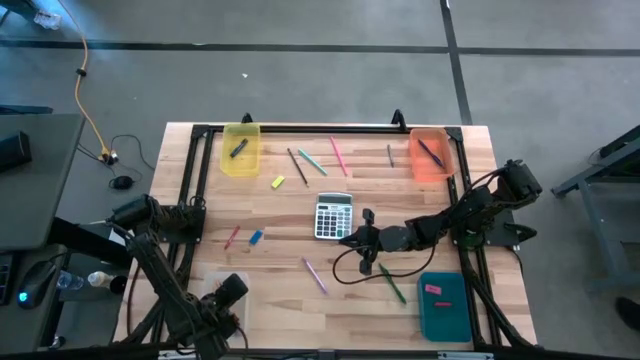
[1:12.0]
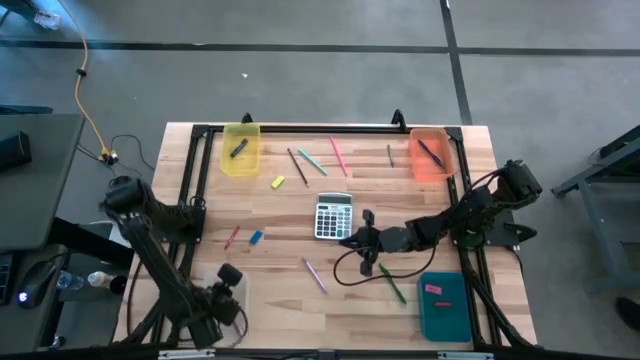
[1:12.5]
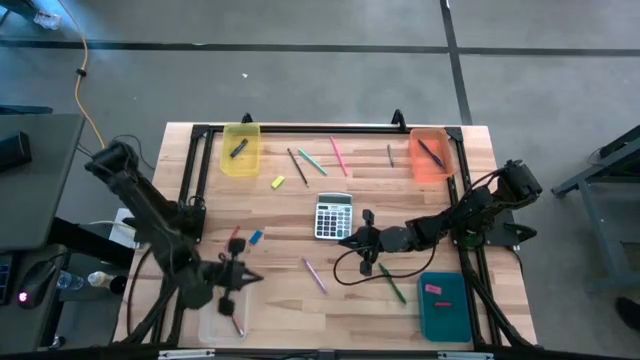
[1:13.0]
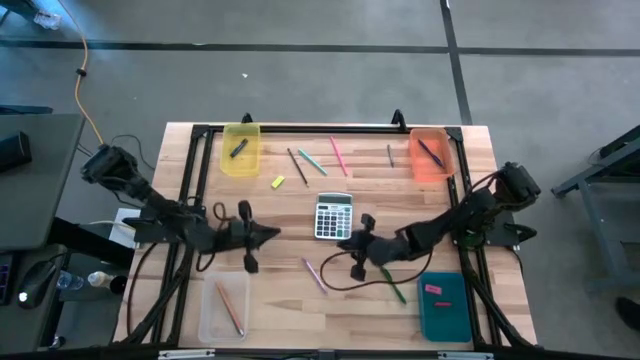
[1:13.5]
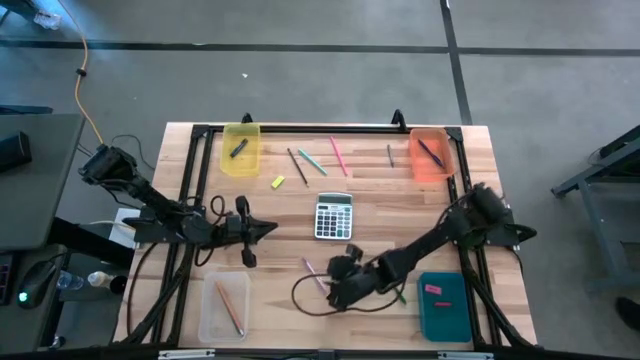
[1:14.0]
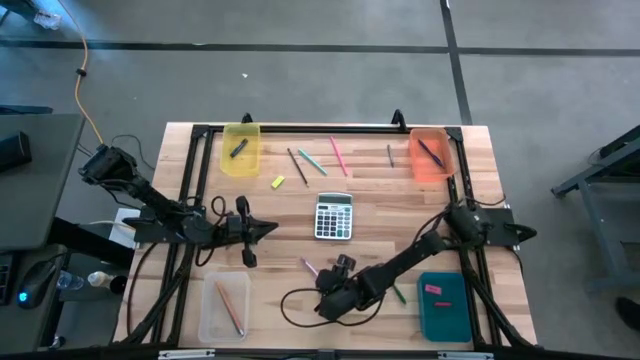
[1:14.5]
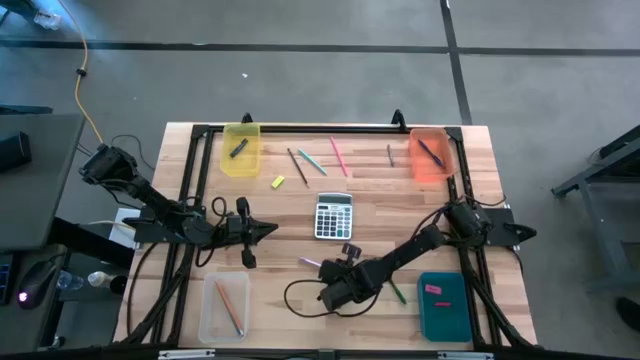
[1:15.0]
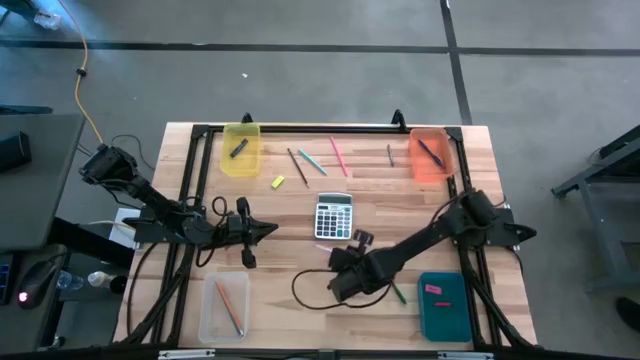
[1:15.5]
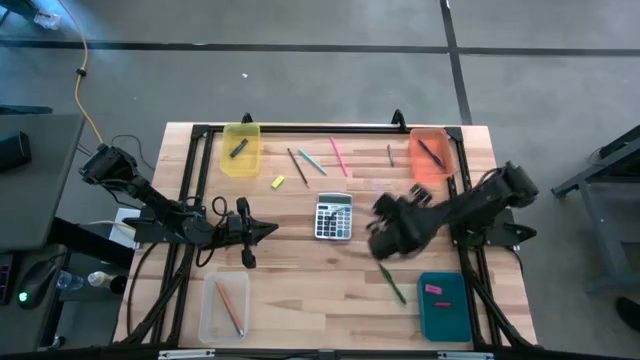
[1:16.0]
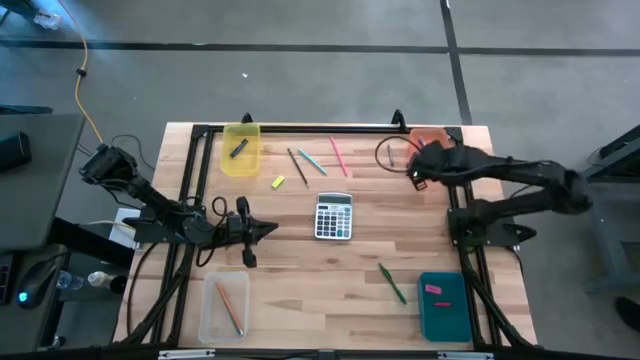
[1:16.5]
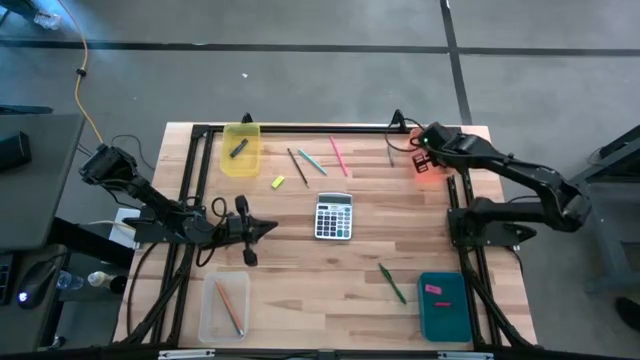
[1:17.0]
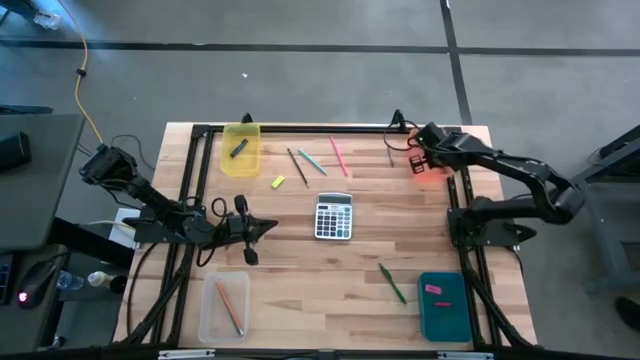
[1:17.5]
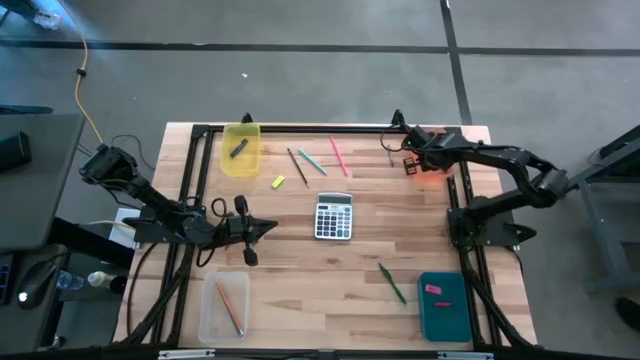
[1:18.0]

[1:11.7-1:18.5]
Task: Sort crayons/erasers/pens/pencils in bins
Put the pink pen into the orange bin

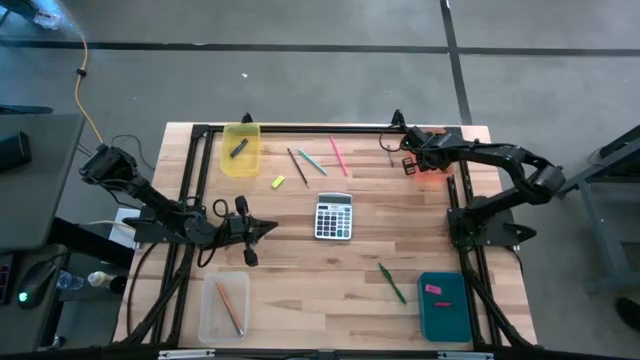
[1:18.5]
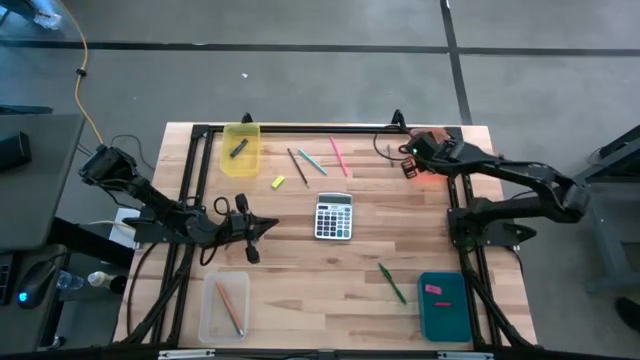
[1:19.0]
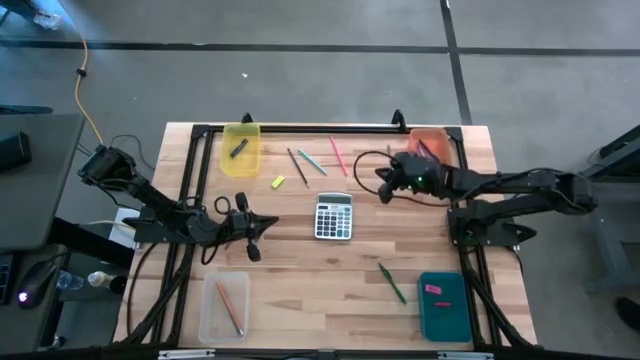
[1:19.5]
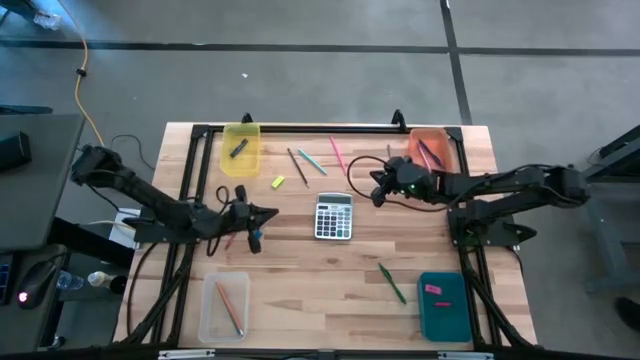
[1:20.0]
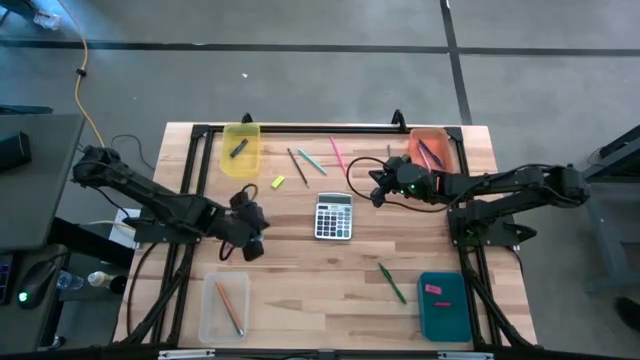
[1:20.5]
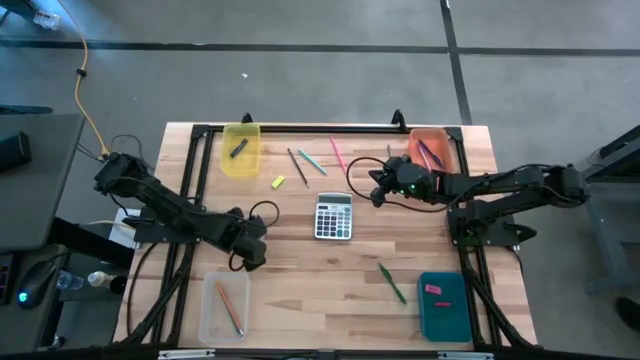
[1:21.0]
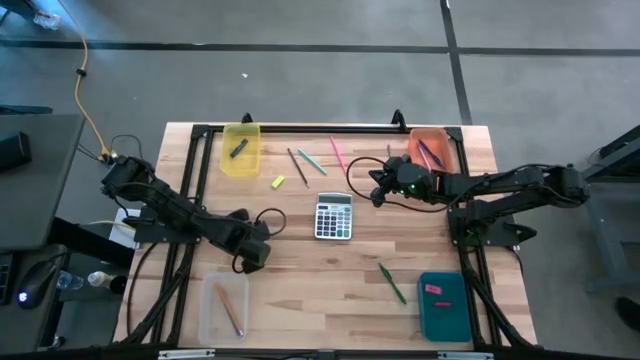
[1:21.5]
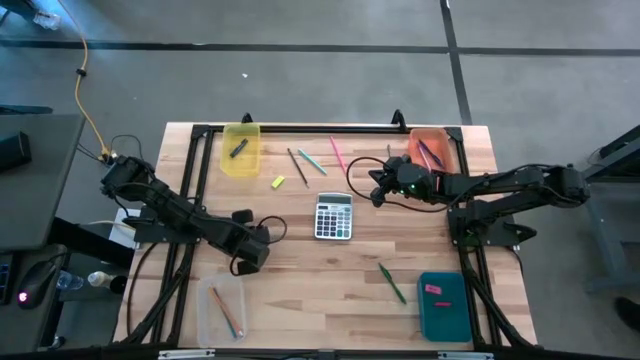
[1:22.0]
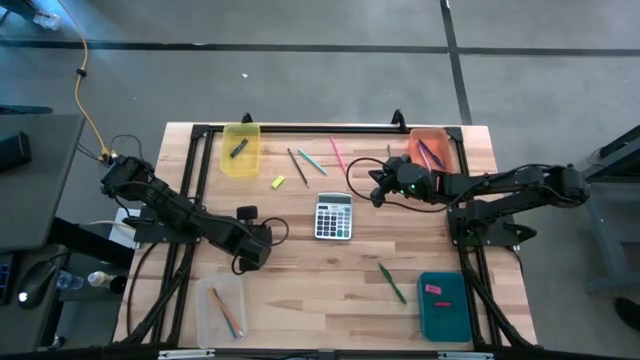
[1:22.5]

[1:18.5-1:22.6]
Put the blue eraser into the blue bin

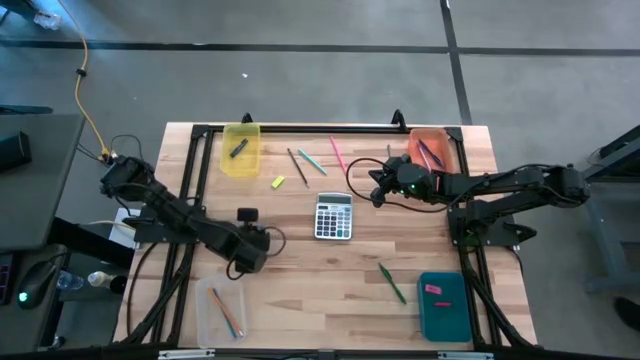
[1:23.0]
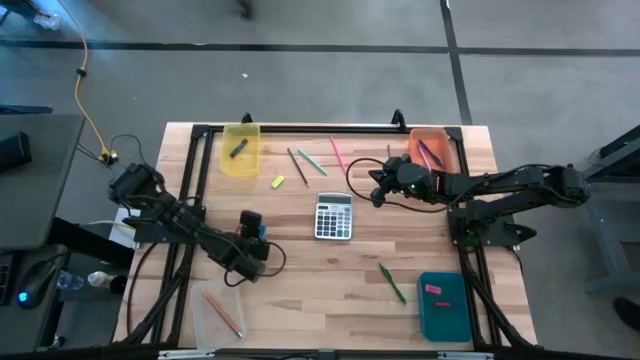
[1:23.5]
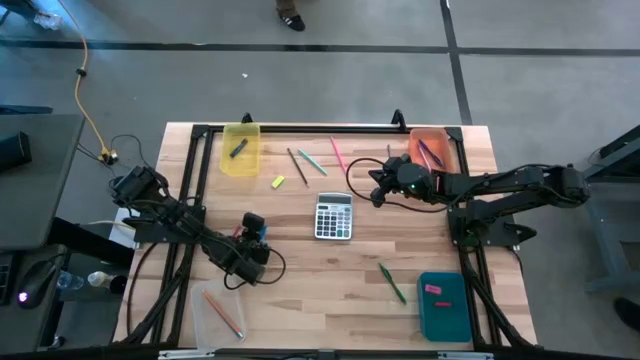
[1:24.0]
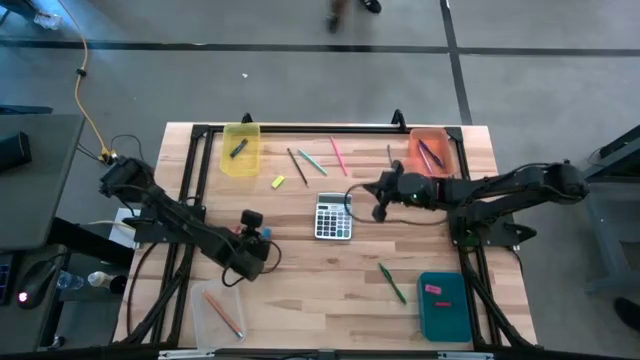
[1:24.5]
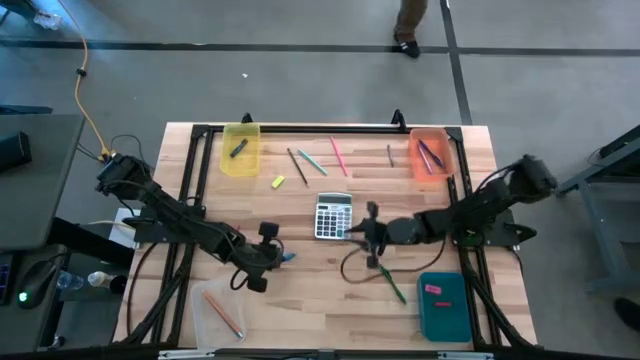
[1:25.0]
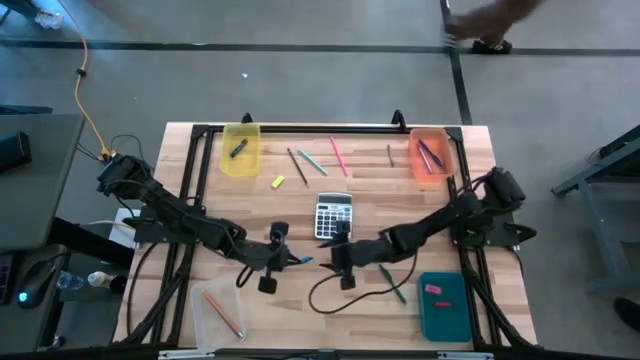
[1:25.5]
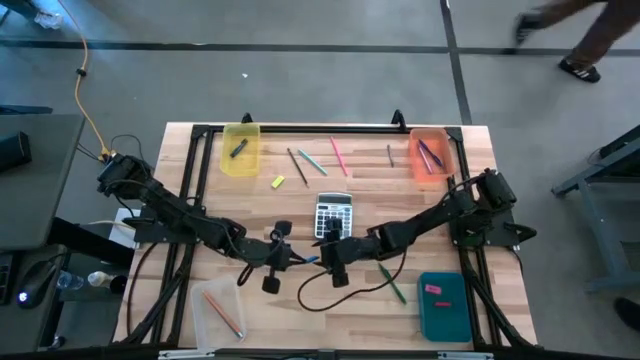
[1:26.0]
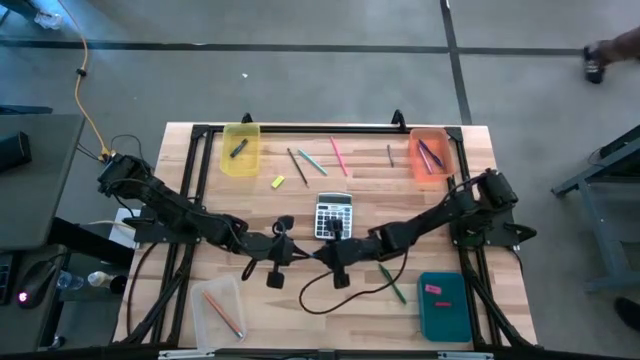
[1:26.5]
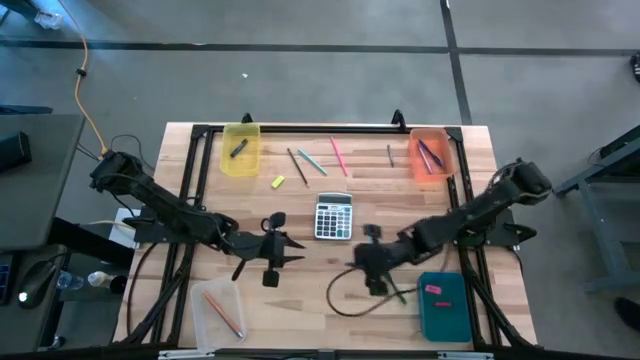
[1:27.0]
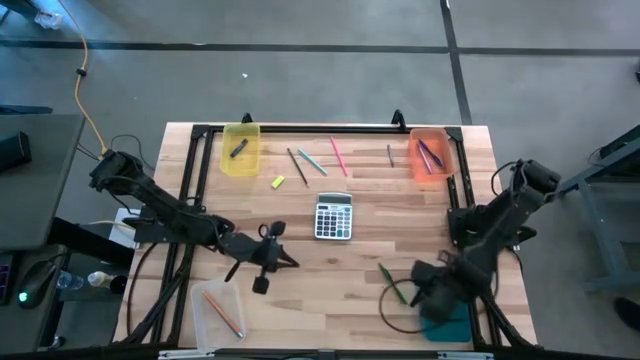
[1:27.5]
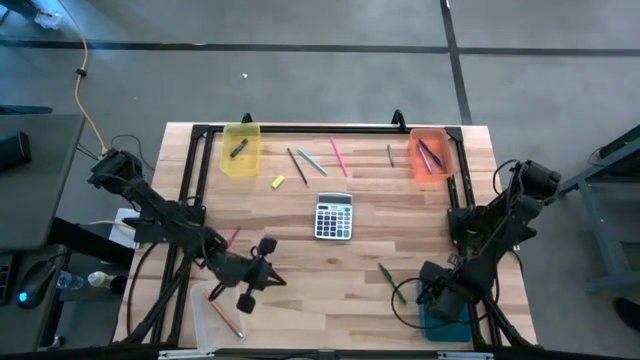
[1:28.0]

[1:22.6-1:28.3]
Put the blue eraser into the blue bin

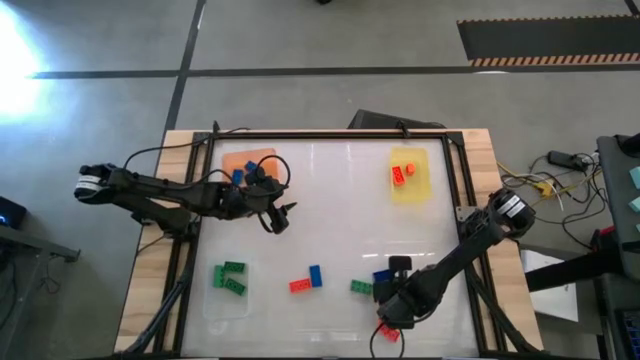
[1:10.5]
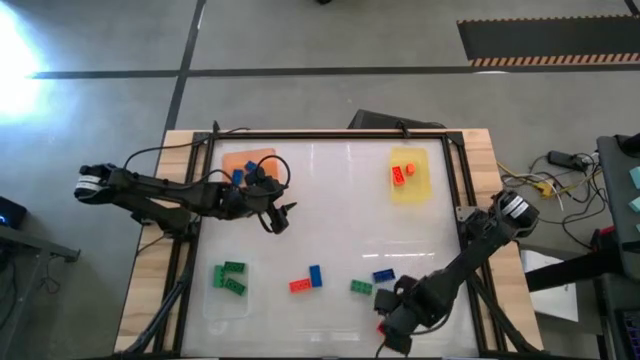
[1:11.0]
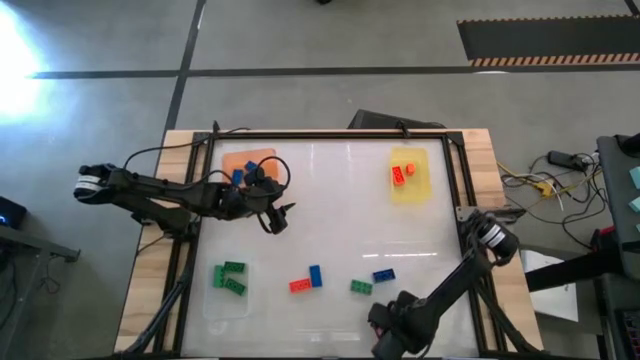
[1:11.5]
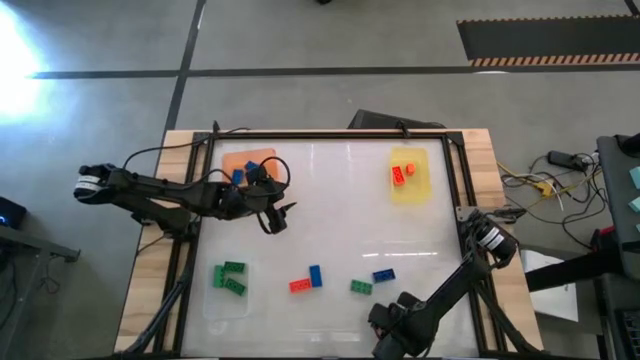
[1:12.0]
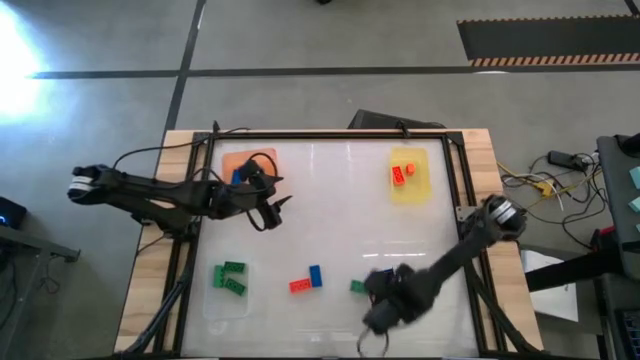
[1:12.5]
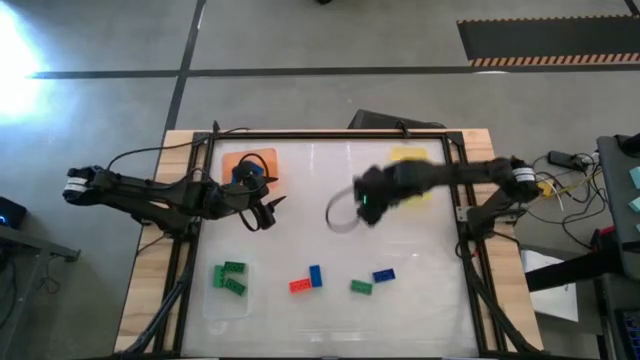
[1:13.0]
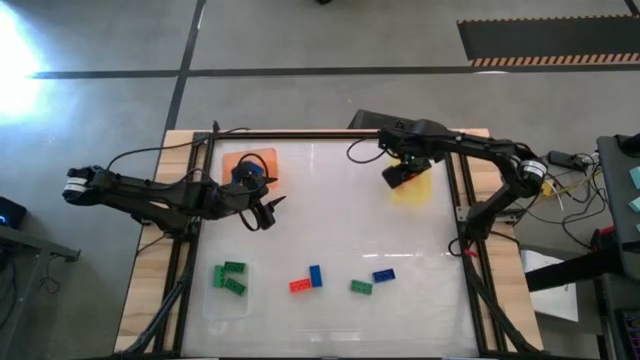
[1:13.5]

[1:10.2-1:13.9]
Task: Sort & place blocks by color
Put the orange game piece into the yellow bin
